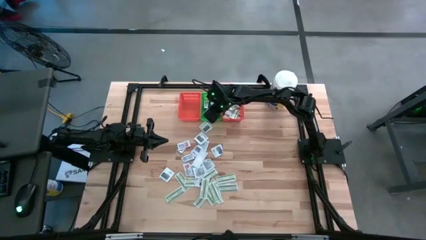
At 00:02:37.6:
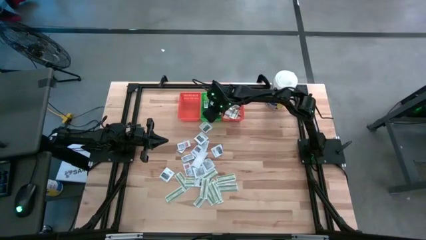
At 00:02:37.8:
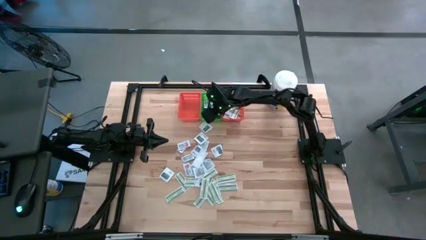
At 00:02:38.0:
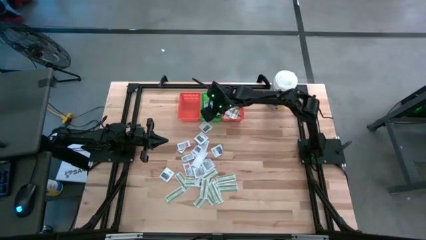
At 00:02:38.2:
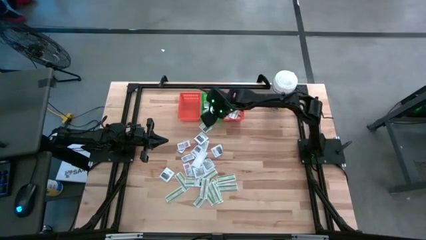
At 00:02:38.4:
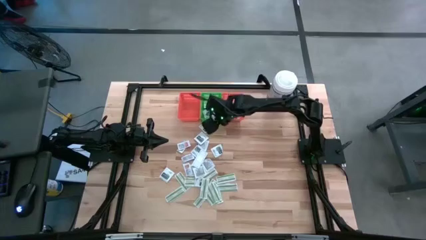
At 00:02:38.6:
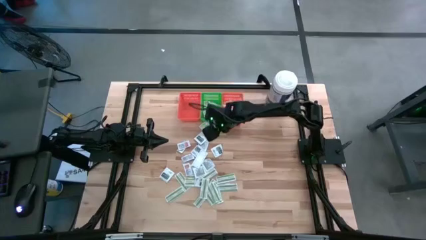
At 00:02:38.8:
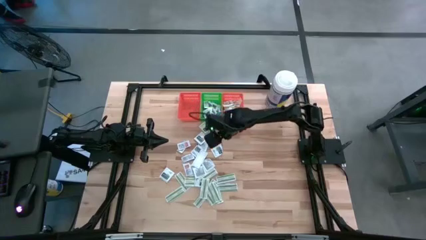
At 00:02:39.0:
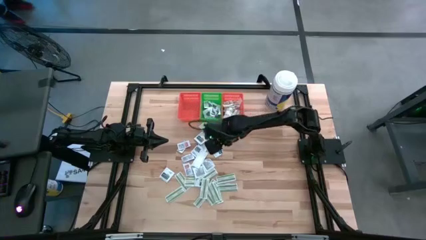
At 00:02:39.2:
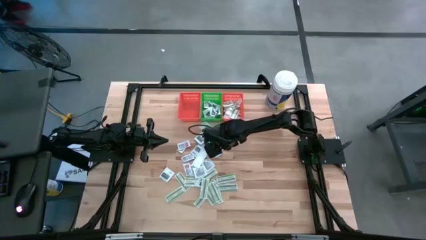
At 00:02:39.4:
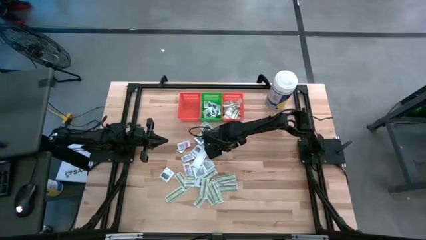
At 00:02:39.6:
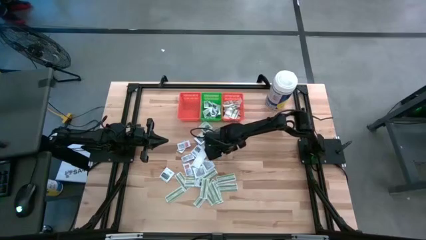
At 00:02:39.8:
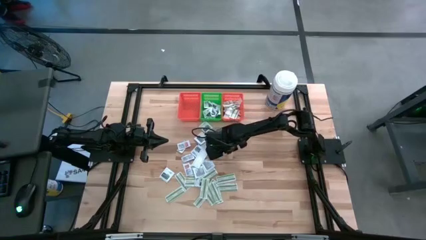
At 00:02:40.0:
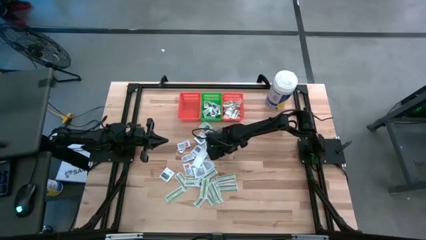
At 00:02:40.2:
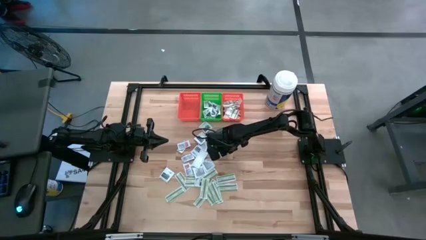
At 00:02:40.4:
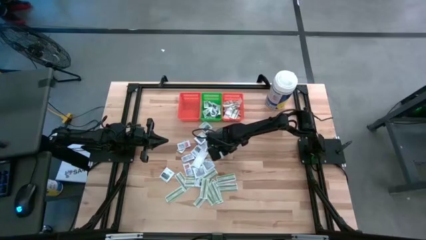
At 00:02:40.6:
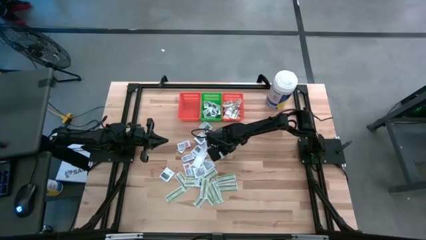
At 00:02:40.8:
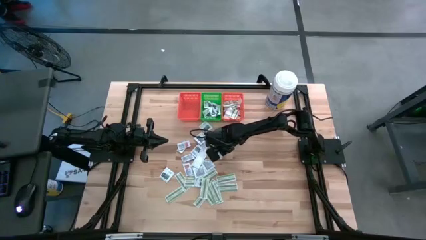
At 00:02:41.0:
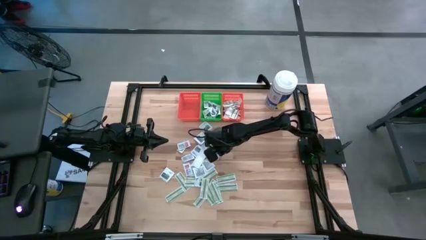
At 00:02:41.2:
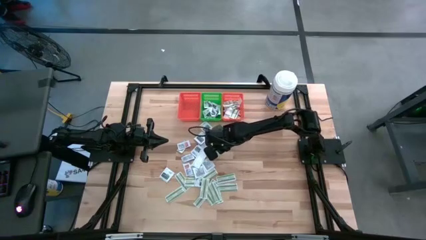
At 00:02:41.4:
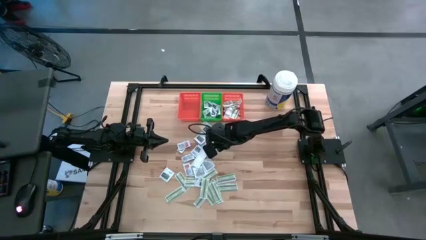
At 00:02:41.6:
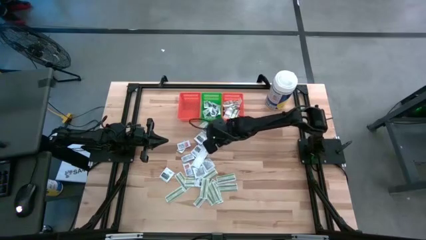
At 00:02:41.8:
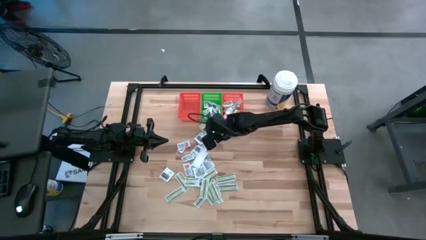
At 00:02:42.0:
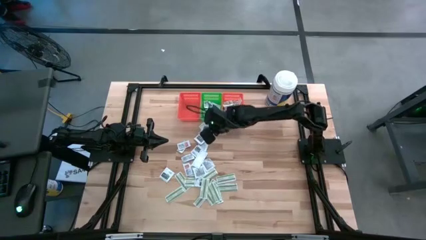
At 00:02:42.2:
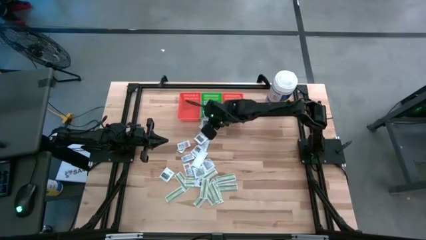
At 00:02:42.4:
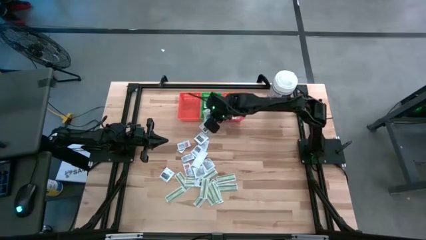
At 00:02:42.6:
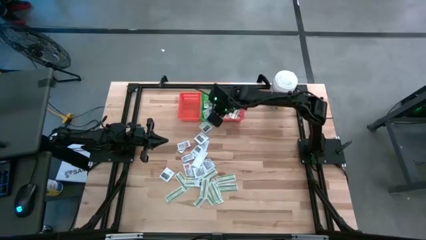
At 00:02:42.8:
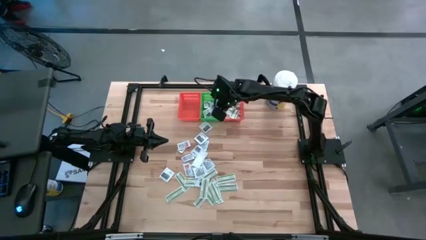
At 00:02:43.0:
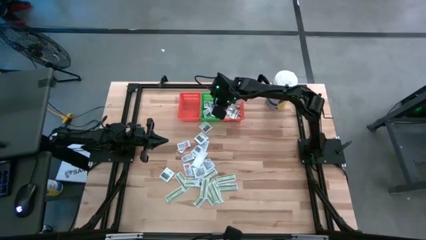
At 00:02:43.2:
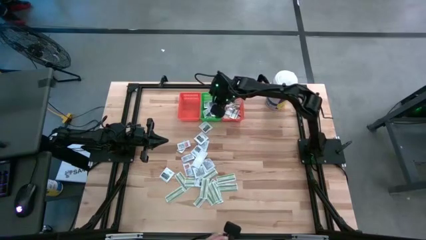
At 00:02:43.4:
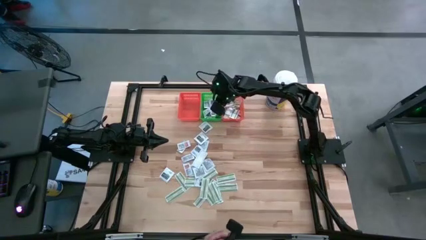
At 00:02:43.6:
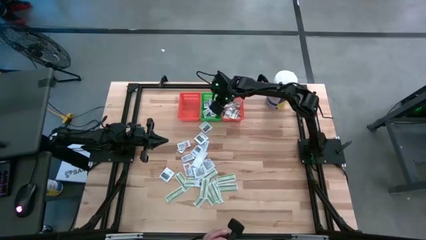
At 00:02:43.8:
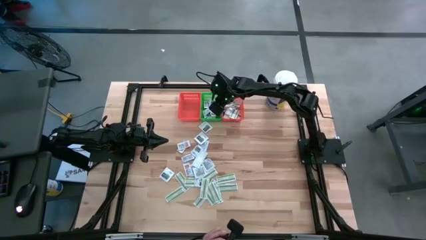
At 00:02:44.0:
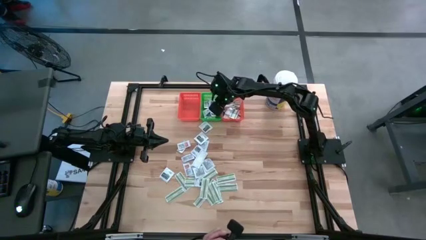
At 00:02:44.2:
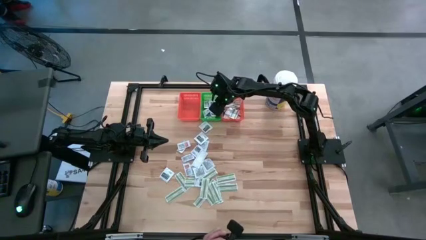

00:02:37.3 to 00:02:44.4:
Task: Pick & Place First Aid Supplies
Put the towelette pack into the green bin

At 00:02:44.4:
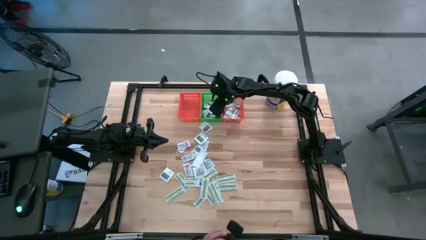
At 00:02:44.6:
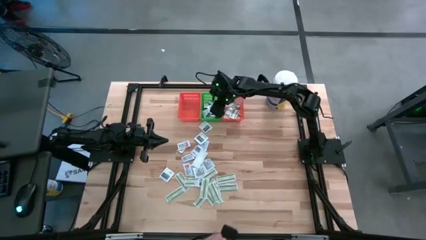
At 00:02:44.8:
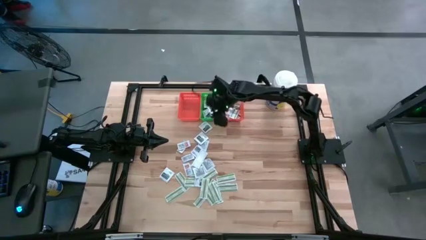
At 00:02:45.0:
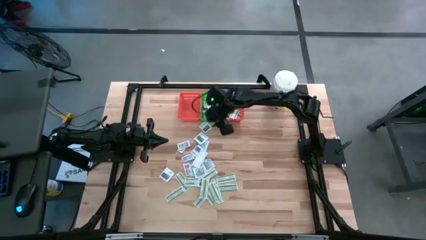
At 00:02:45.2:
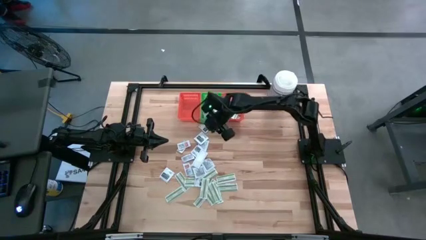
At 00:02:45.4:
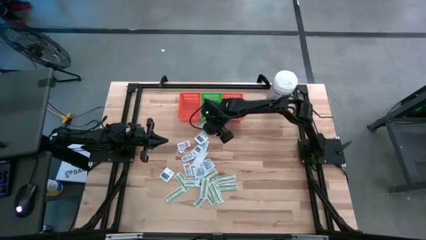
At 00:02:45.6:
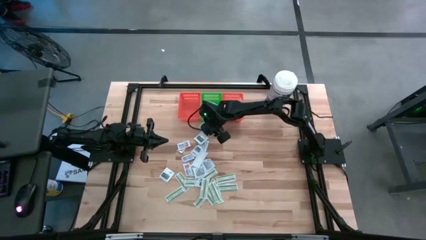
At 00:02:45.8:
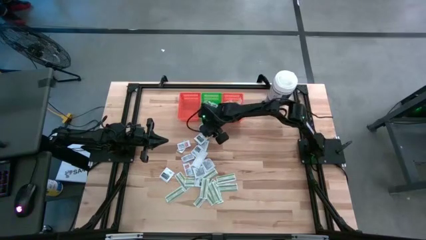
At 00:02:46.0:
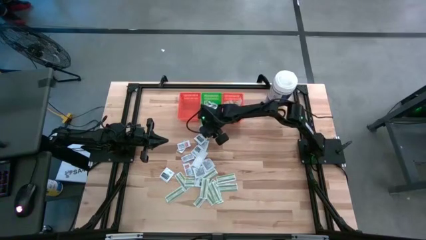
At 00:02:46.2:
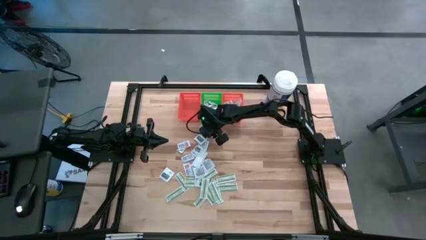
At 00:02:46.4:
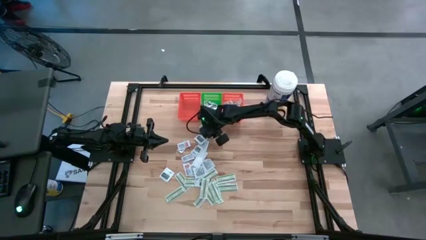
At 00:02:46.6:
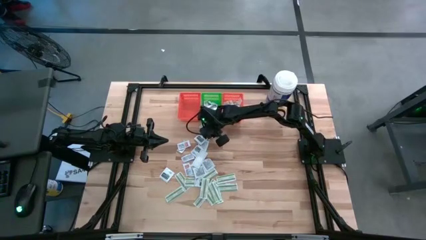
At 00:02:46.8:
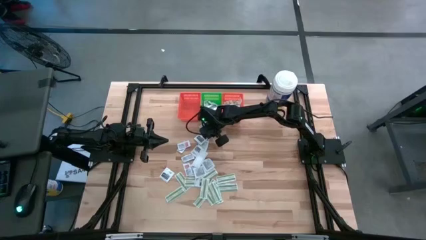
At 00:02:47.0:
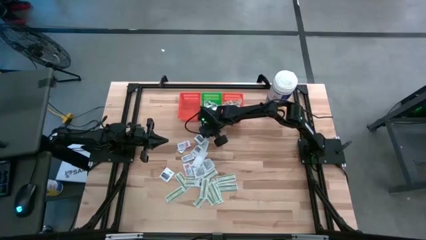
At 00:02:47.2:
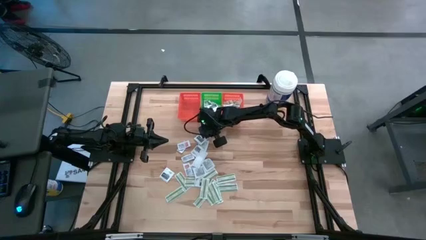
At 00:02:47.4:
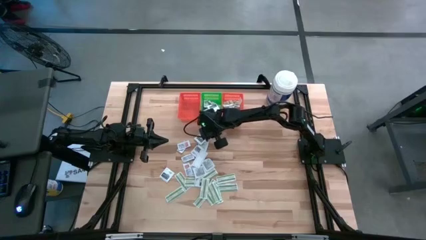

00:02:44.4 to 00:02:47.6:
Put the towelette pack into the green bin

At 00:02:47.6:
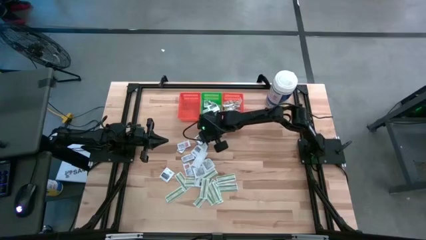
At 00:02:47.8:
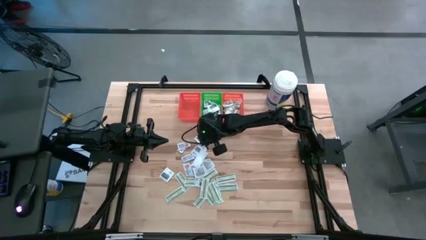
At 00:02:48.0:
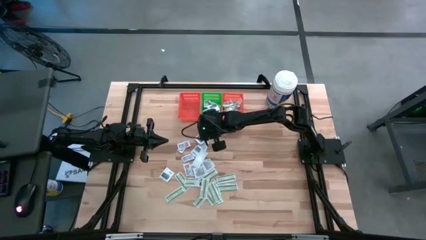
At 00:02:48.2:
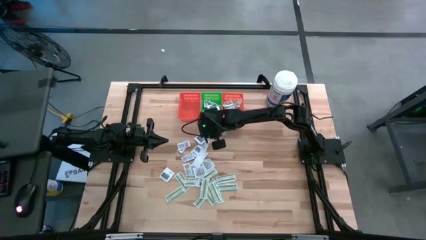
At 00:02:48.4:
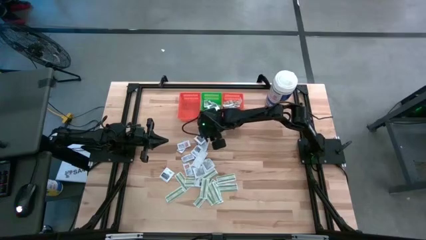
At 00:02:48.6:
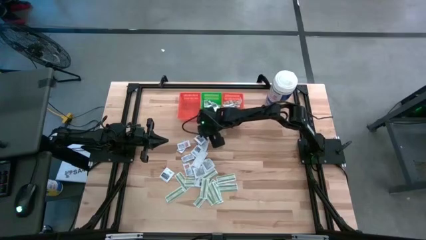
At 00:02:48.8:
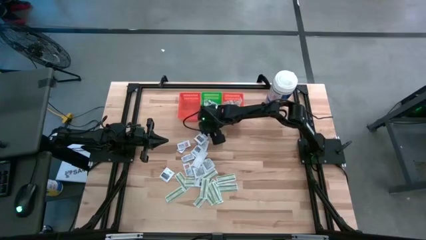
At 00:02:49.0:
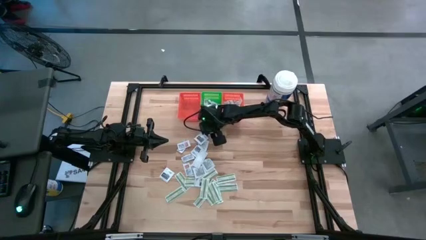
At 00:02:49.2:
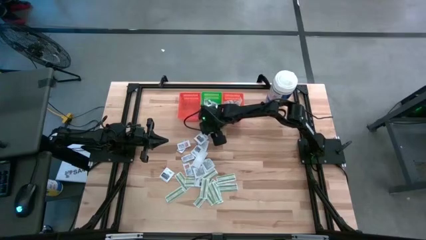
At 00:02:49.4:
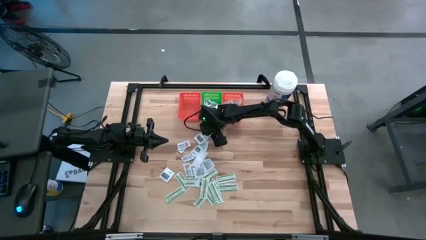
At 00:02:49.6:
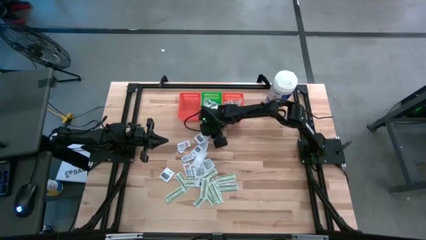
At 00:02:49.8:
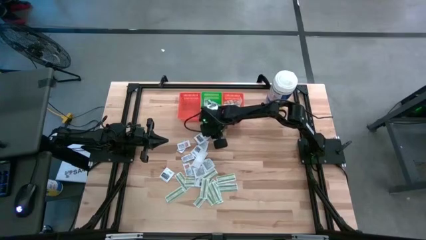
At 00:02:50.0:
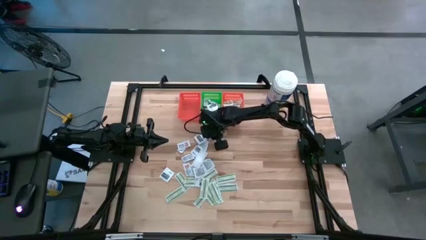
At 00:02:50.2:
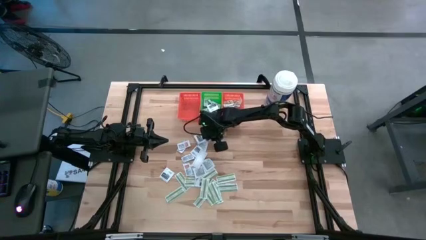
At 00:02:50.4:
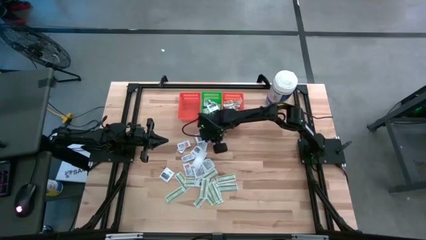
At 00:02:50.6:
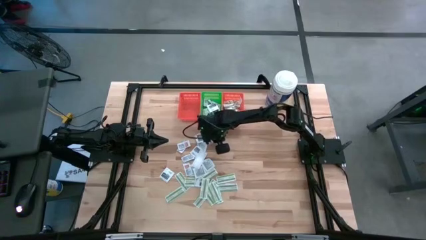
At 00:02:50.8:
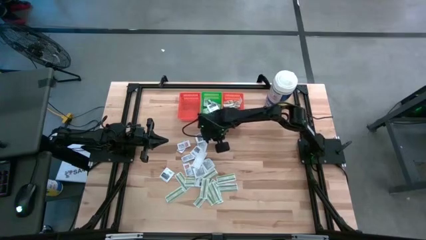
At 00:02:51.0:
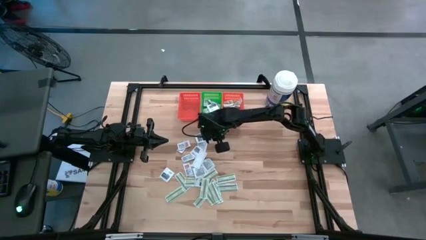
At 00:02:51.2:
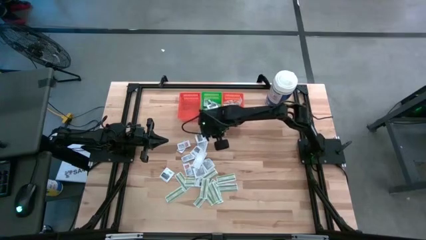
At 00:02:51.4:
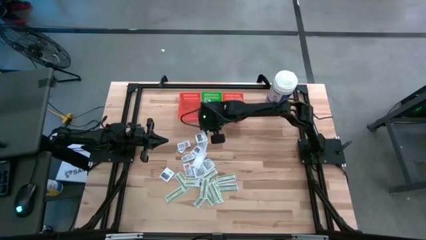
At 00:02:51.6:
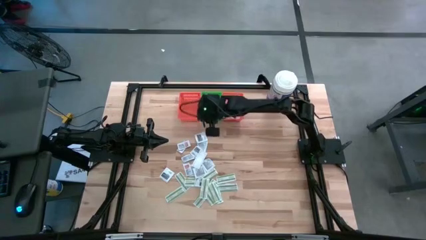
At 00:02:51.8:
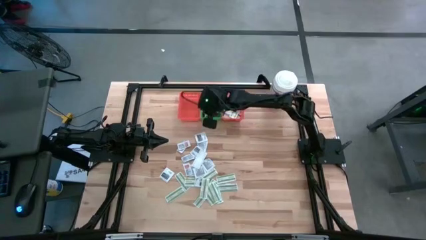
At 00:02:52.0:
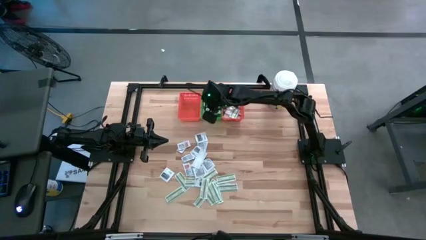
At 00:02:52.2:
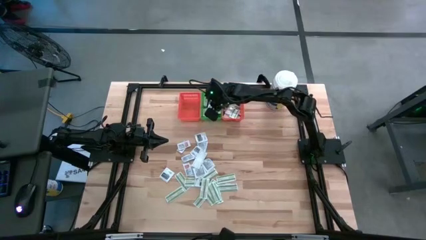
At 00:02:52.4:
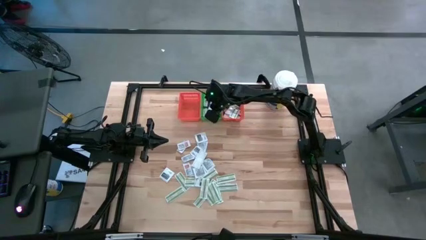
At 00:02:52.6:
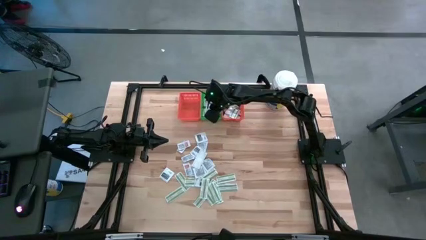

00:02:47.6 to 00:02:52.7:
Put the towelette pack into the green bin
